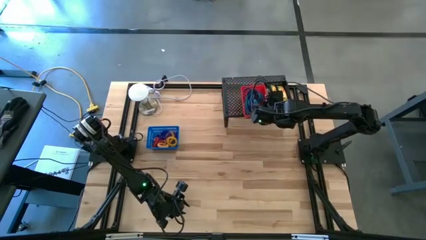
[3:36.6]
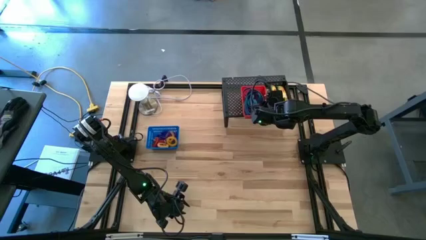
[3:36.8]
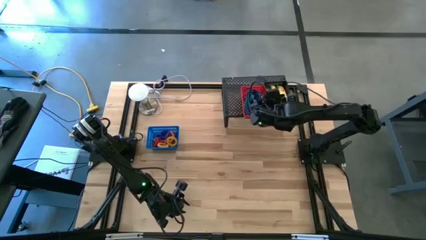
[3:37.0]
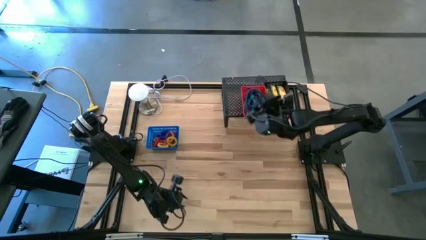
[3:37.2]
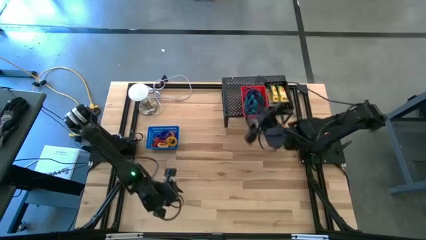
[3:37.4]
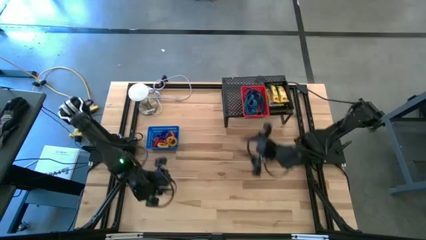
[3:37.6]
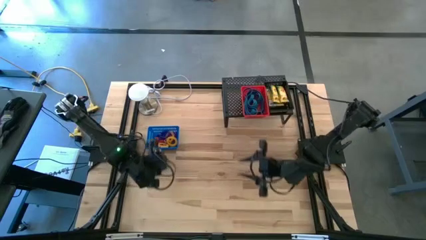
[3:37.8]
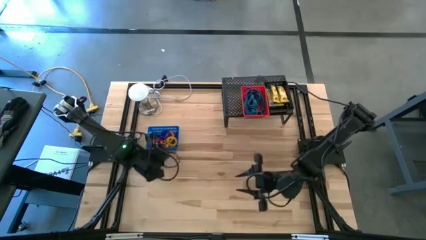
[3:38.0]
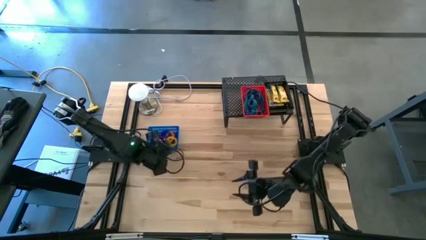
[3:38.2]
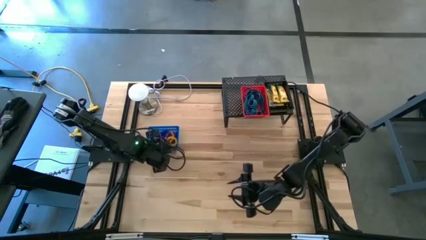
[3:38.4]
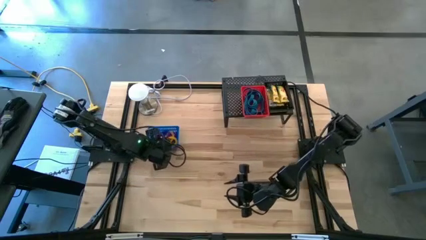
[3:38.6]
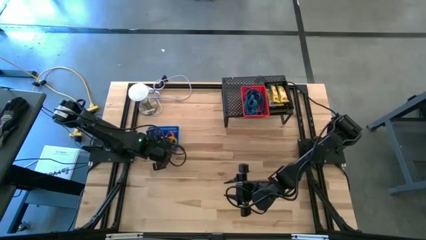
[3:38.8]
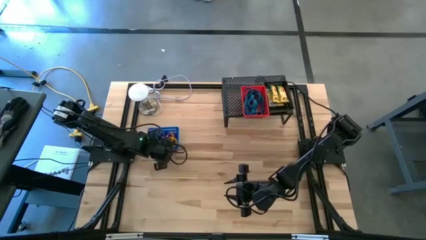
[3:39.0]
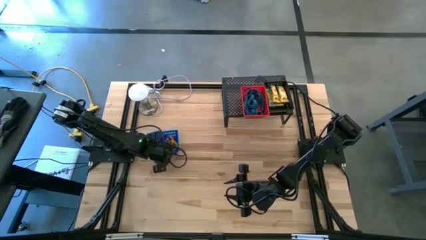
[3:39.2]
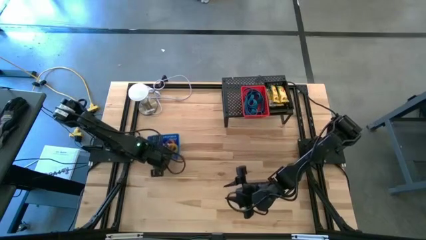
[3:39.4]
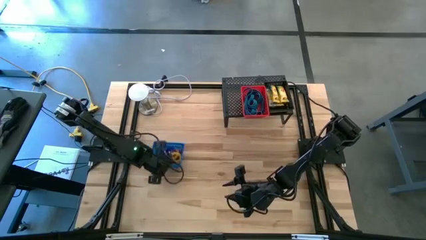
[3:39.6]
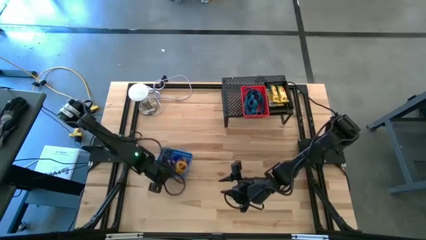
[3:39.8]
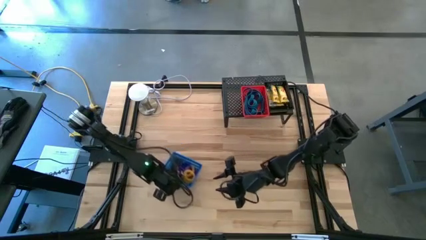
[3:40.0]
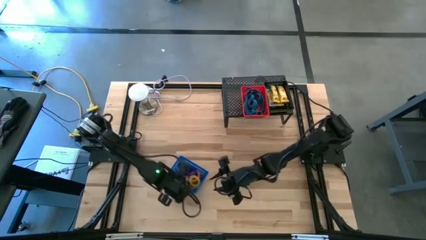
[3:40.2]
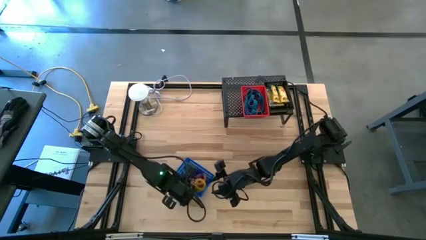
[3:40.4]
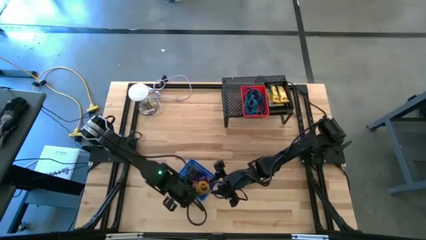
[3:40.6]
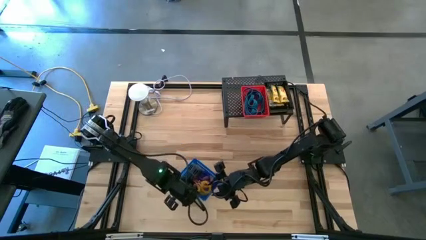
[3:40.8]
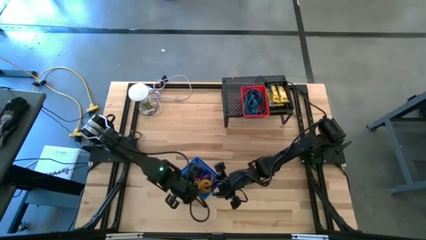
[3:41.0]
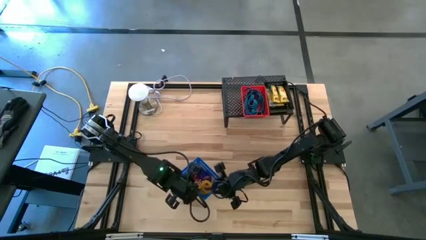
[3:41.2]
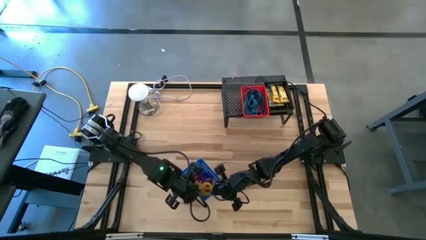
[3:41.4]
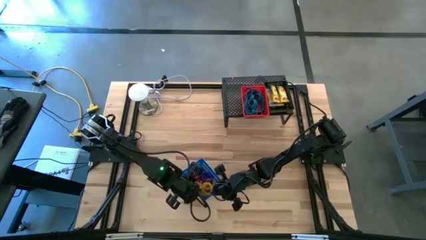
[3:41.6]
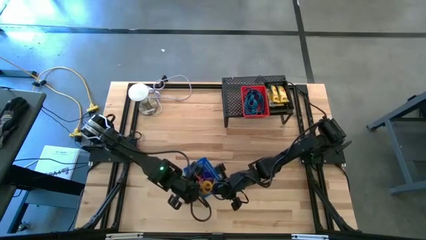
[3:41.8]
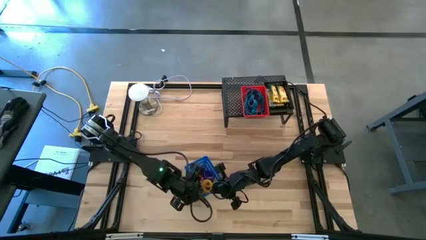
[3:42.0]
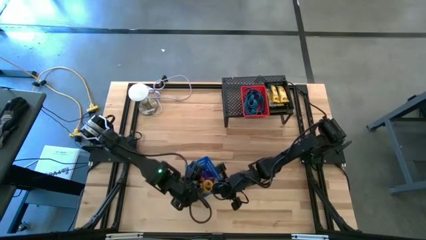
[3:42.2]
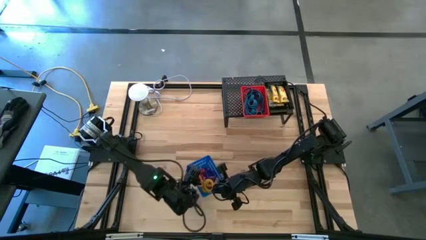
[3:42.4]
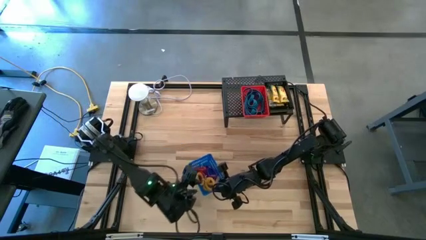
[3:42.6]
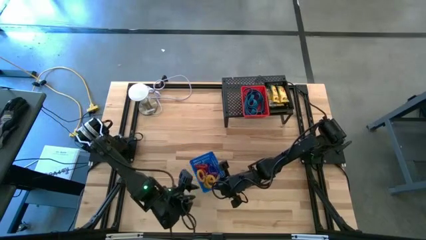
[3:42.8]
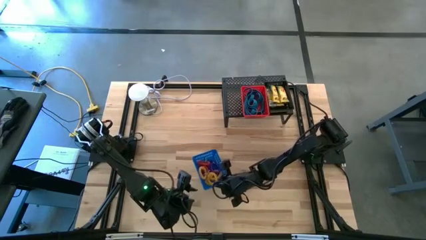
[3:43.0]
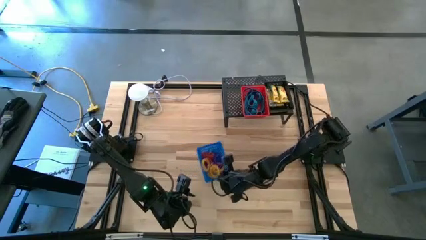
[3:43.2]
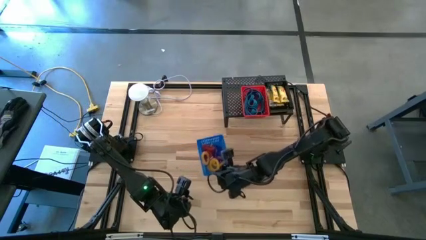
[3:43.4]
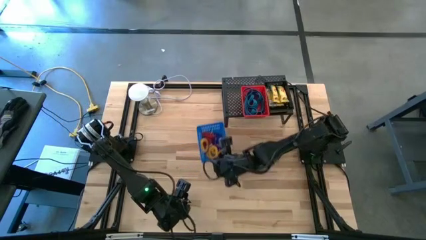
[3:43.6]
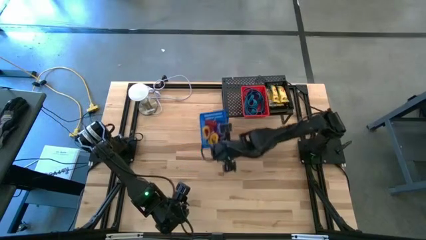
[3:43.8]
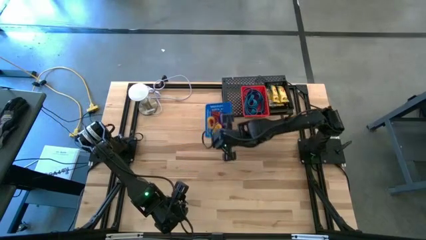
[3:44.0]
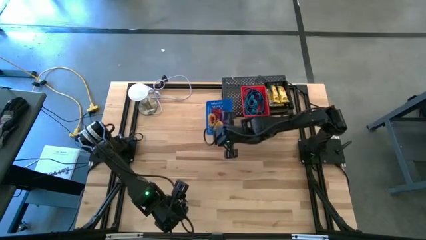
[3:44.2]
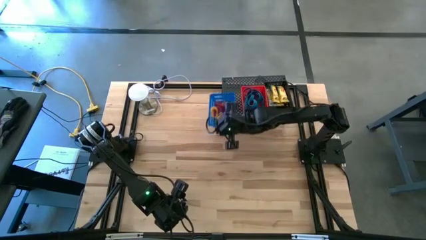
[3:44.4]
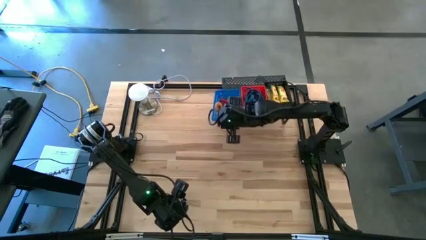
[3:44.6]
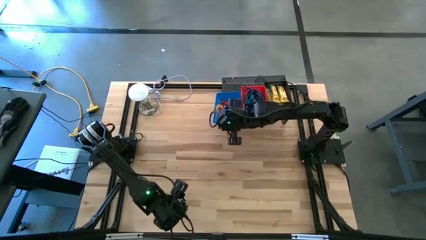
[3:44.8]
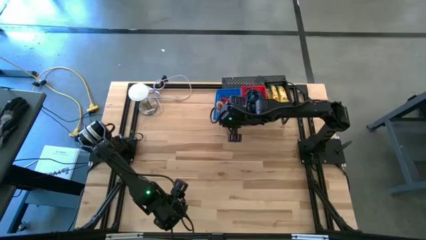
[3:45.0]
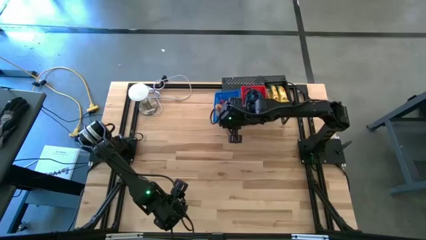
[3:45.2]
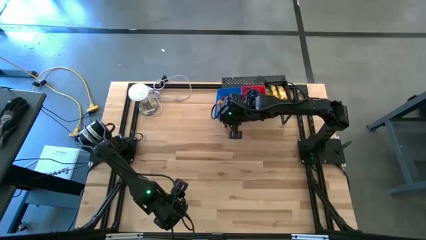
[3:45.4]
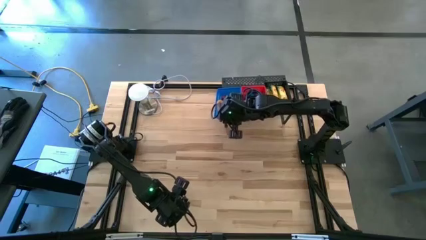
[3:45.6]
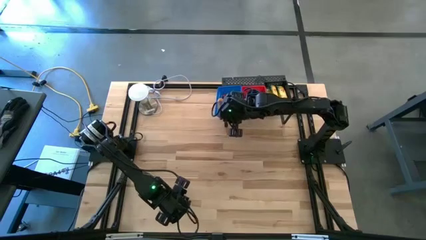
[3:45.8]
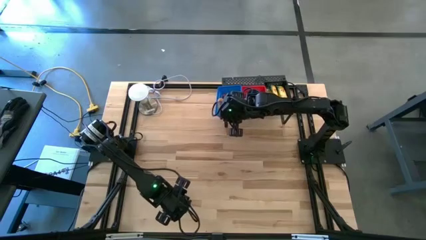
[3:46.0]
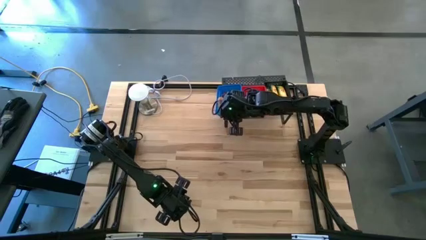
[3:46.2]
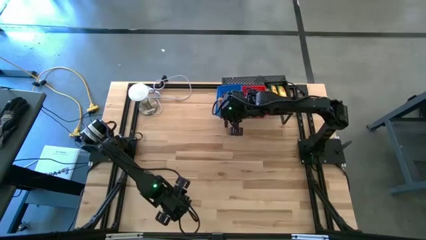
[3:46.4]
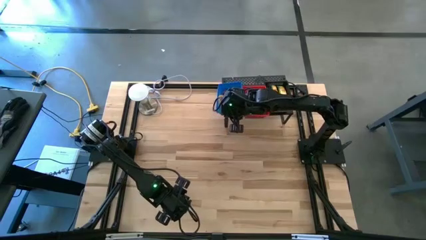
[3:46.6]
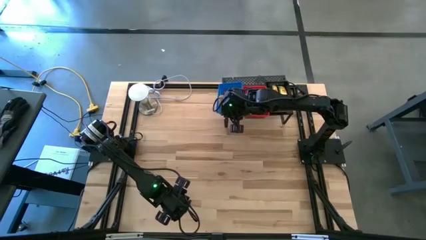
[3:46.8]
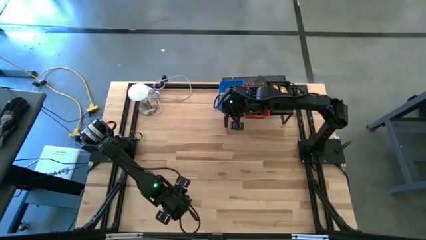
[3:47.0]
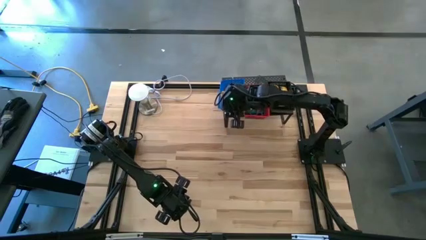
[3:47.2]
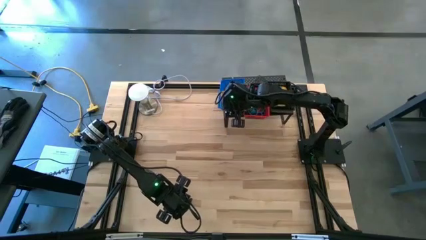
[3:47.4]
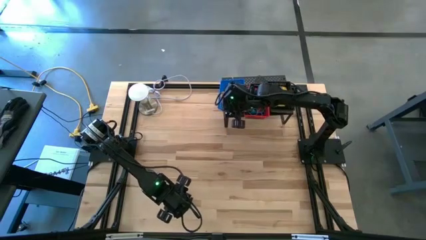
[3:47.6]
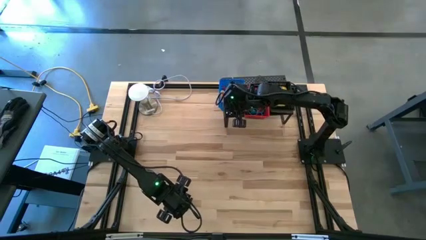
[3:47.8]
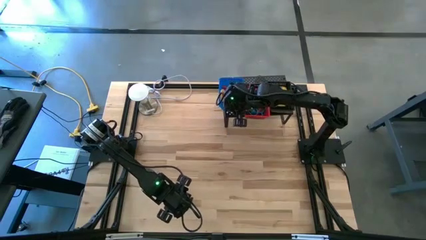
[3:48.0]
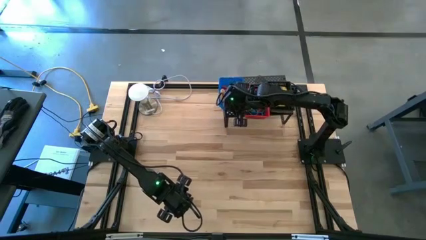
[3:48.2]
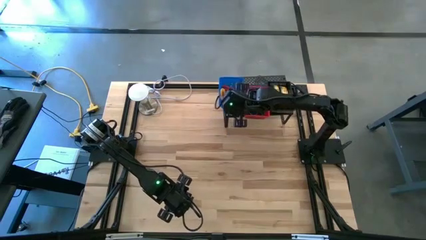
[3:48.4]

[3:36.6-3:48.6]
Task: Pick & Place Office Desk Supplies
Put the blue bin filled with spring keychains on the shelf

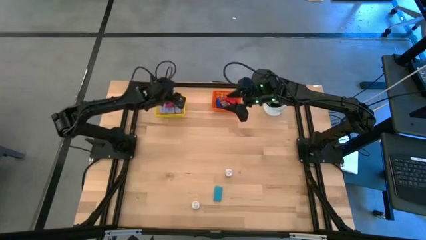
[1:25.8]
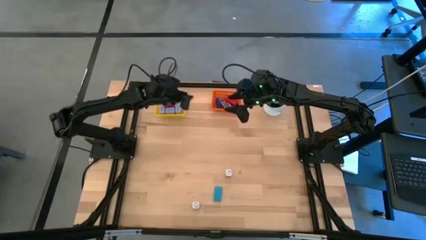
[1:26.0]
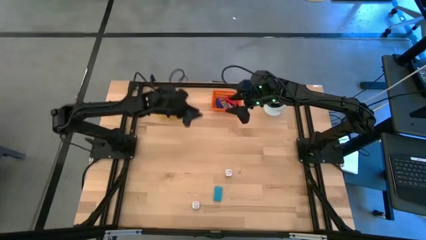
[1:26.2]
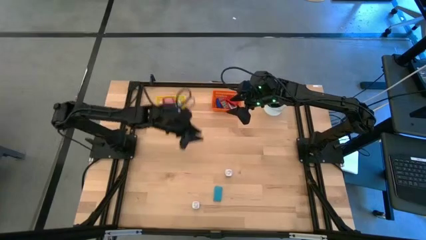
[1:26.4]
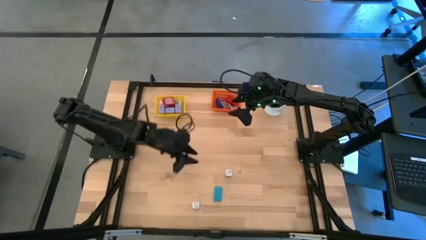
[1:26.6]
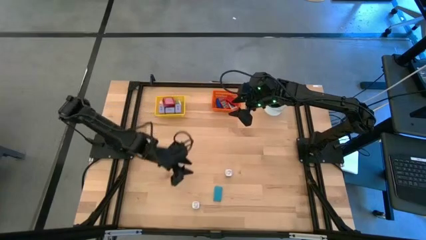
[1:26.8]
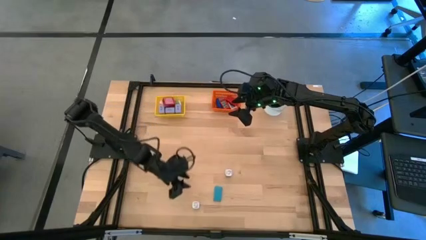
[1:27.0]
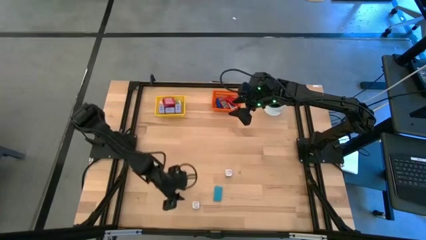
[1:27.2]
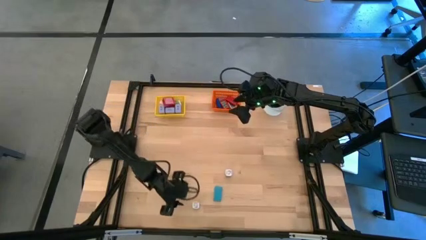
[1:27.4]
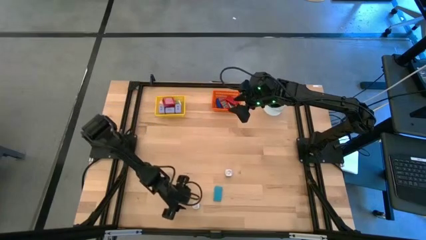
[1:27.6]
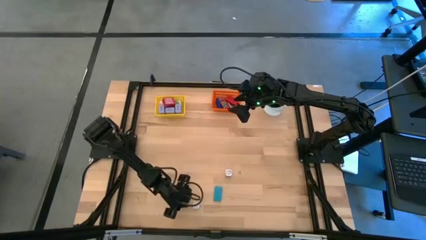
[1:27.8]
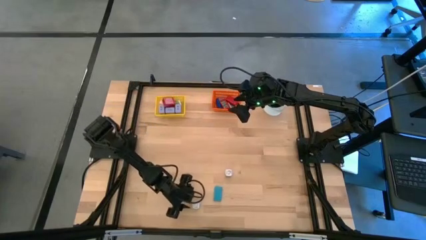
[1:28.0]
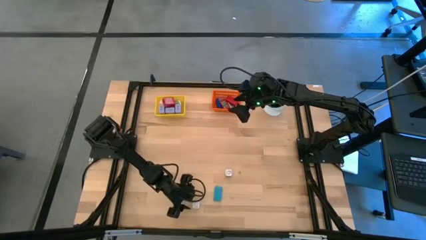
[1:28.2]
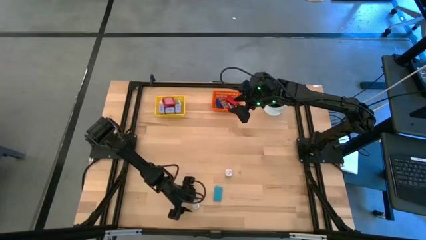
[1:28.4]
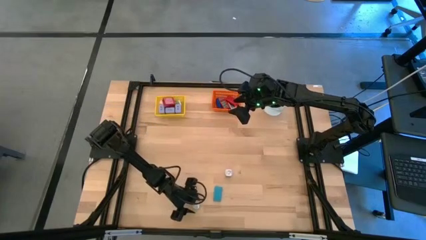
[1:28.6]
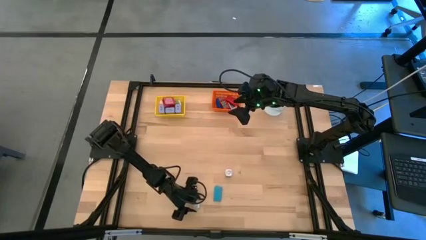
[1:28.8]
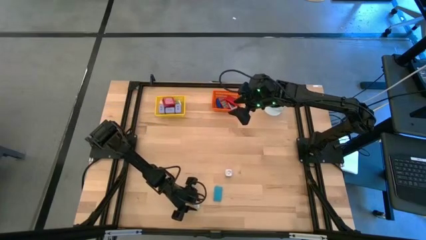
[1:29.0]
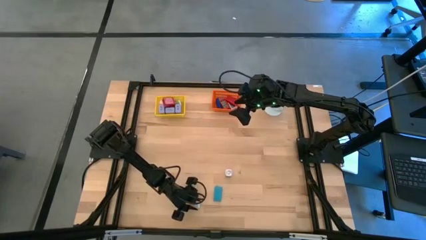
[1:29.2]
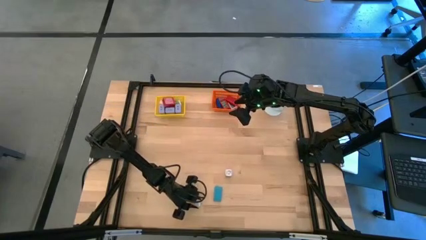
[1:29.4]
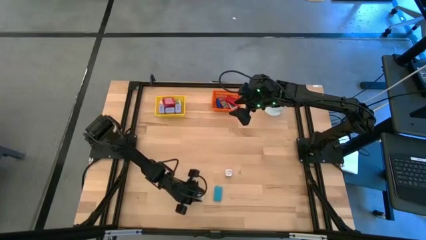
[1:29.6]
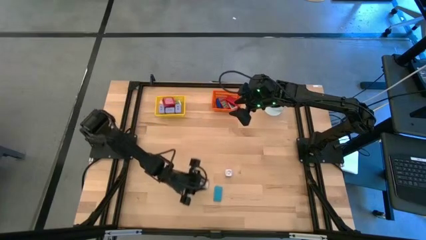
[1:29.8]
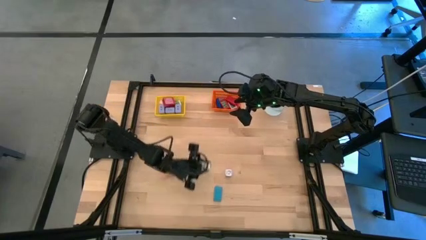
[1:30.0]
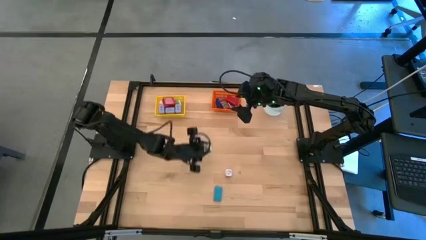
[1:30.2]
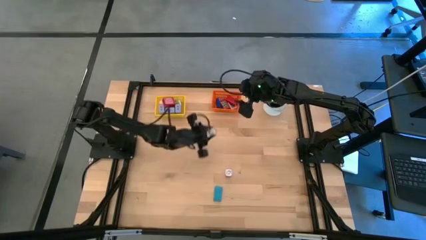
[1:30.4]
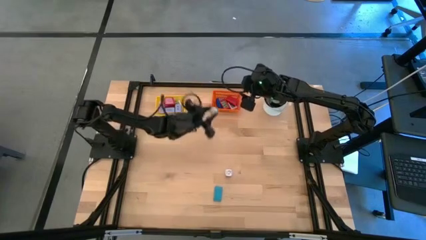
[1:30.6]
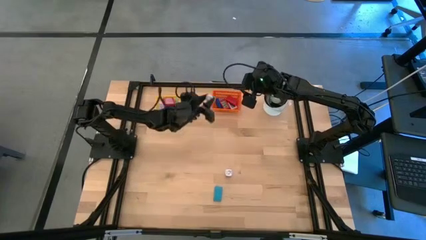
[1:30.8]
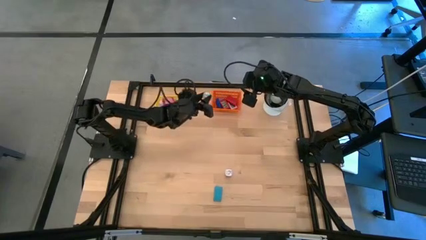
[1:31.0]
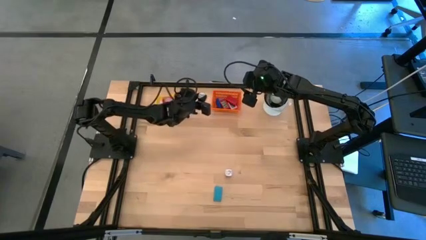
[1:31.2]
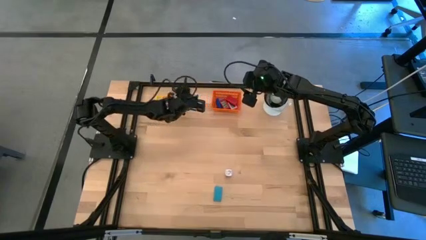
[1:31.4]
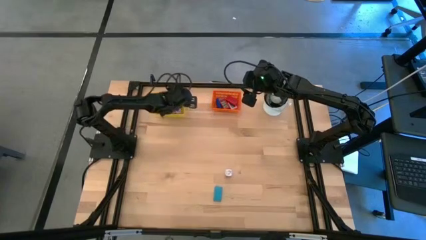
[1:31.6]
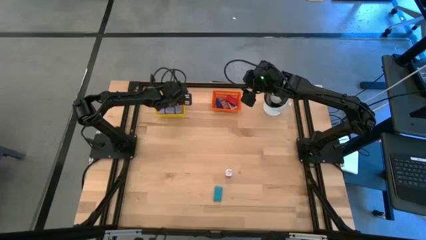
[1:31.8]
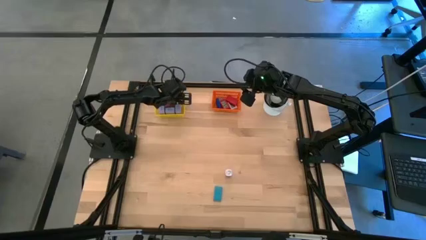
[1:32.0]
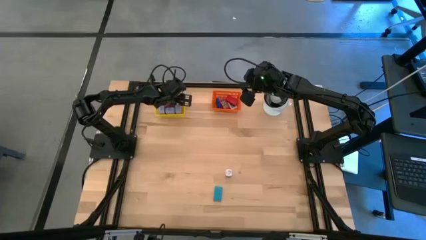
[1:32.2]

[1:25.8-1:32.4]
Task: Pick & Place Office items
Put the green changer adapter into the yellow bin
